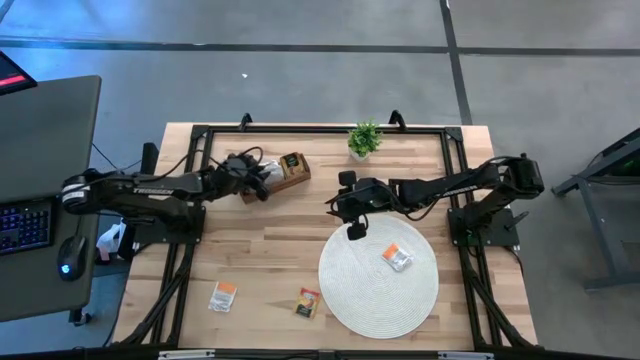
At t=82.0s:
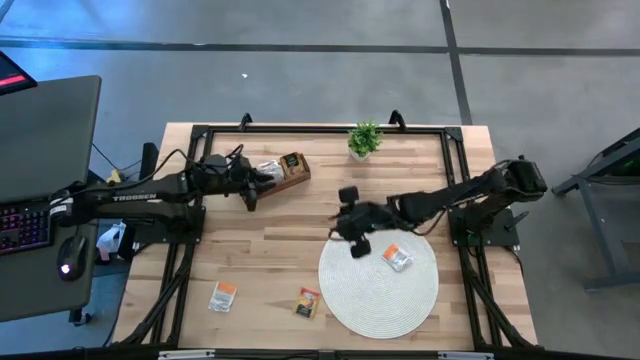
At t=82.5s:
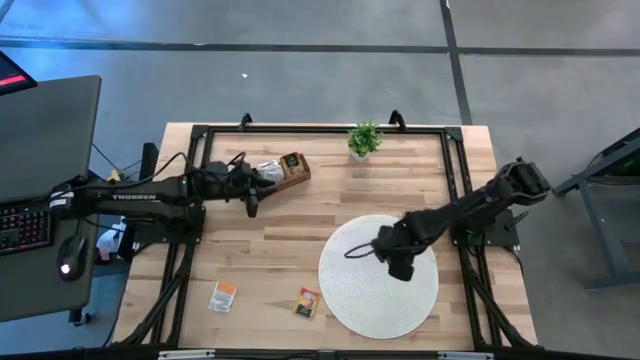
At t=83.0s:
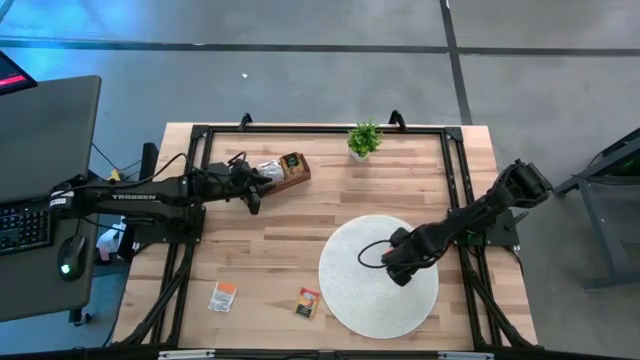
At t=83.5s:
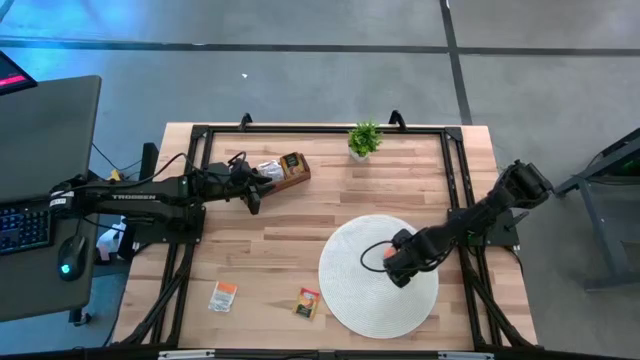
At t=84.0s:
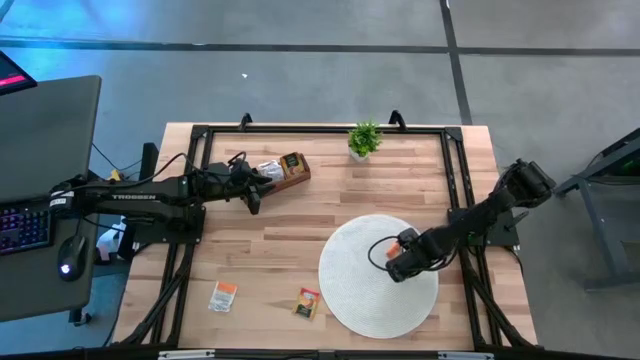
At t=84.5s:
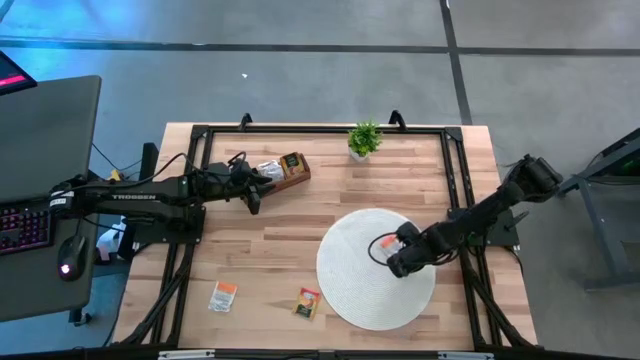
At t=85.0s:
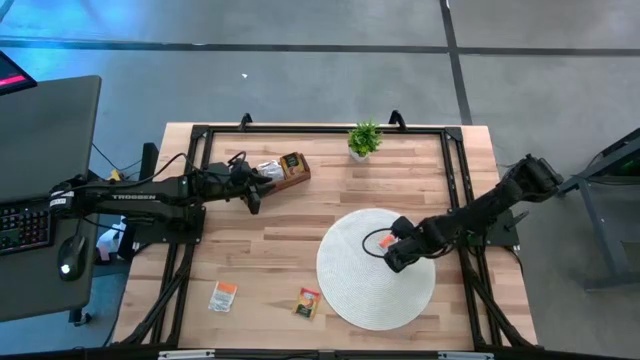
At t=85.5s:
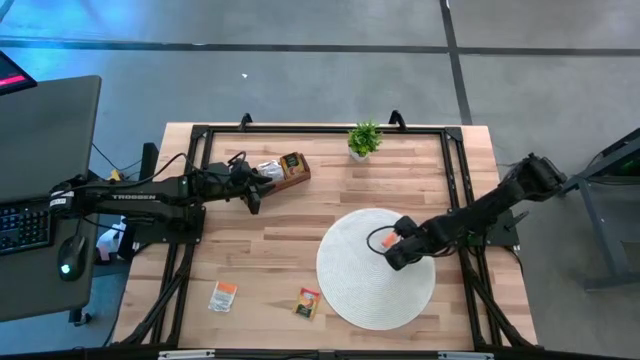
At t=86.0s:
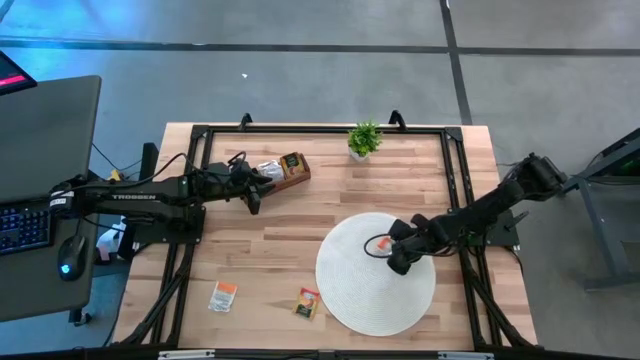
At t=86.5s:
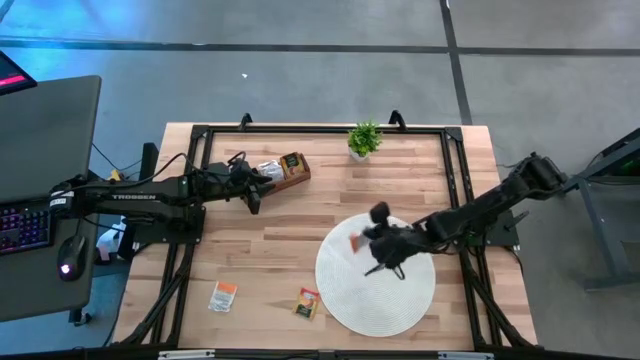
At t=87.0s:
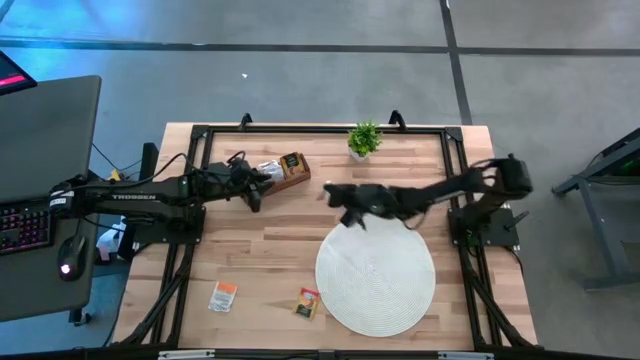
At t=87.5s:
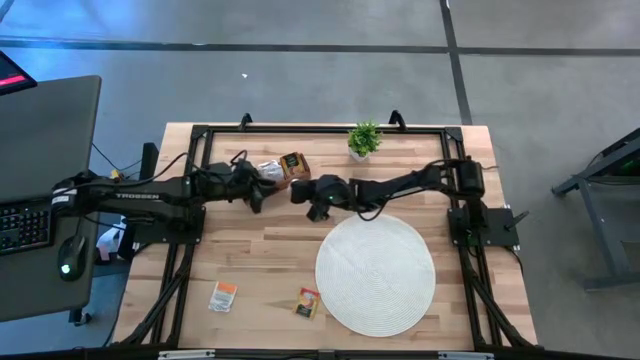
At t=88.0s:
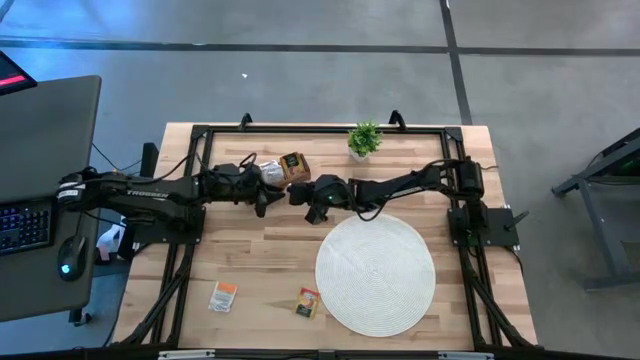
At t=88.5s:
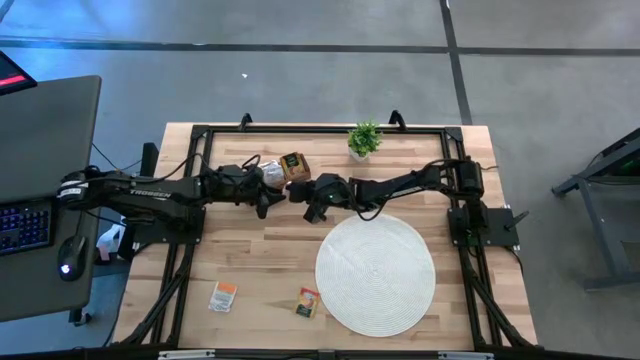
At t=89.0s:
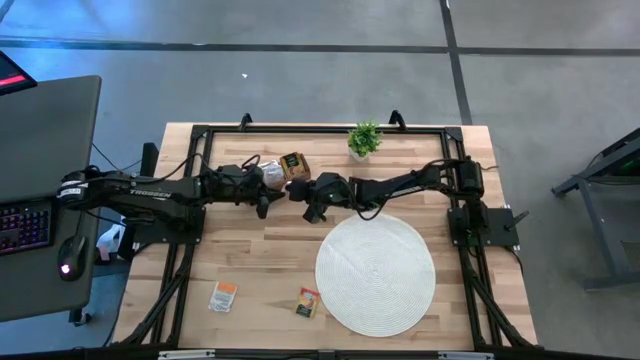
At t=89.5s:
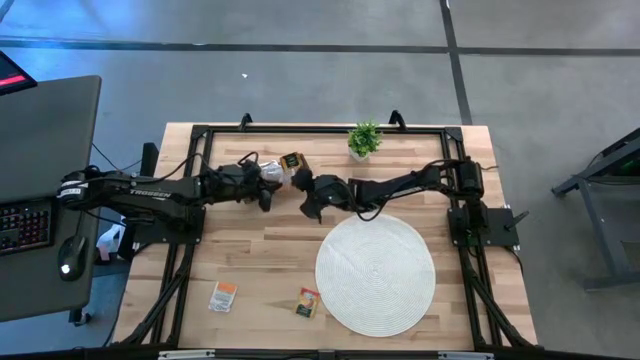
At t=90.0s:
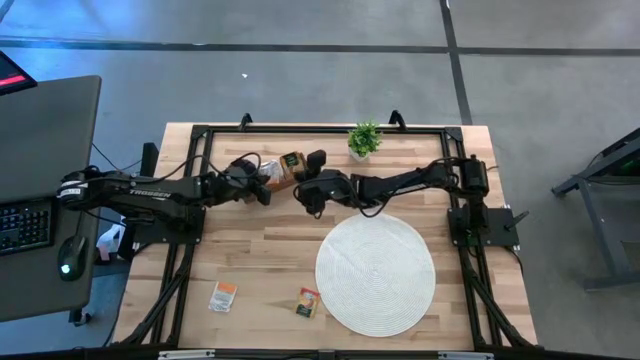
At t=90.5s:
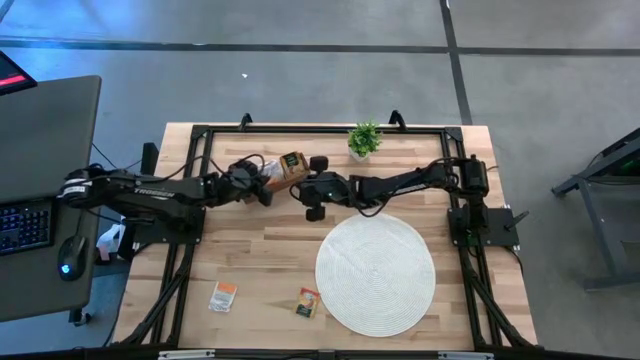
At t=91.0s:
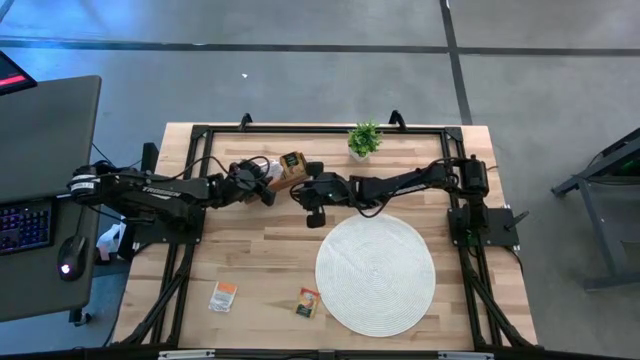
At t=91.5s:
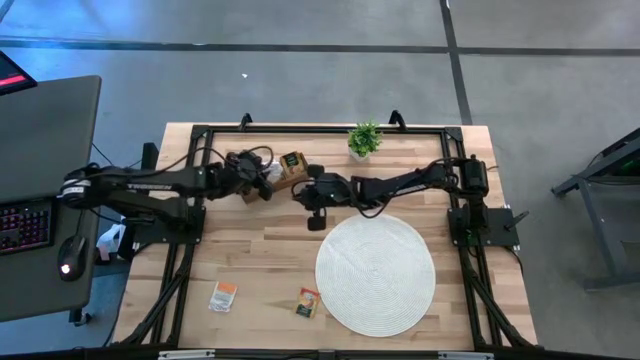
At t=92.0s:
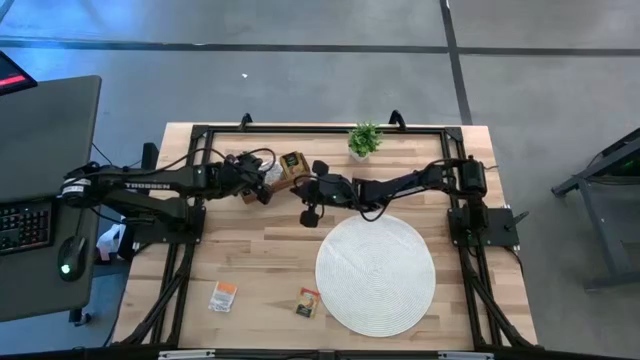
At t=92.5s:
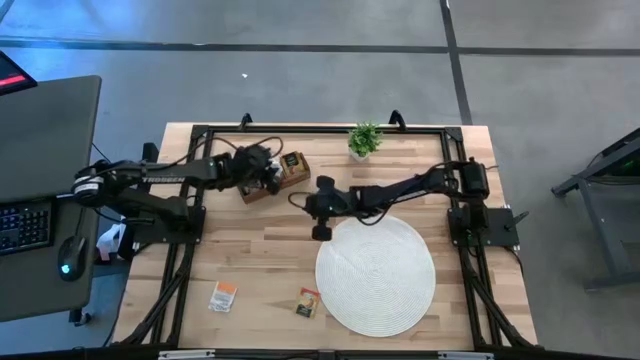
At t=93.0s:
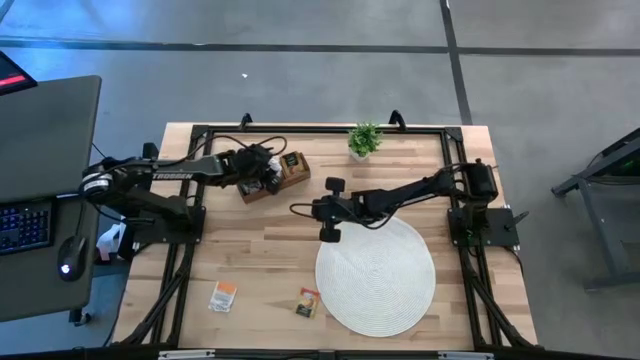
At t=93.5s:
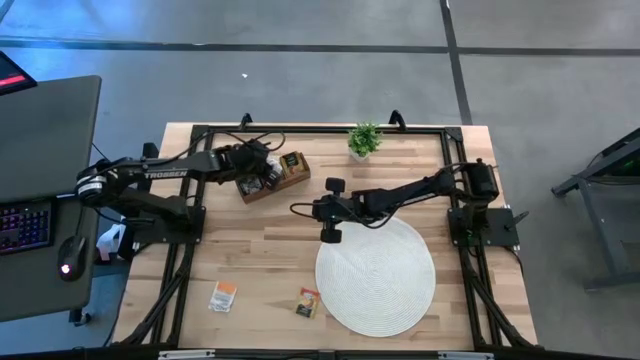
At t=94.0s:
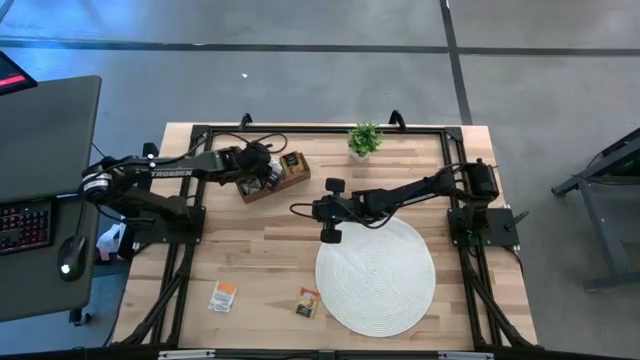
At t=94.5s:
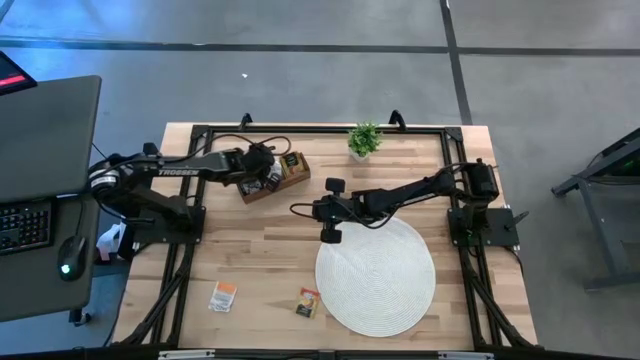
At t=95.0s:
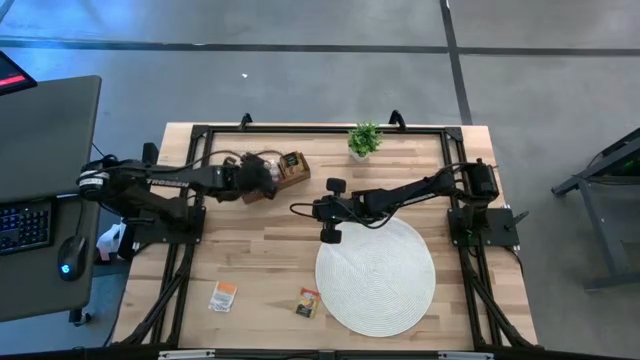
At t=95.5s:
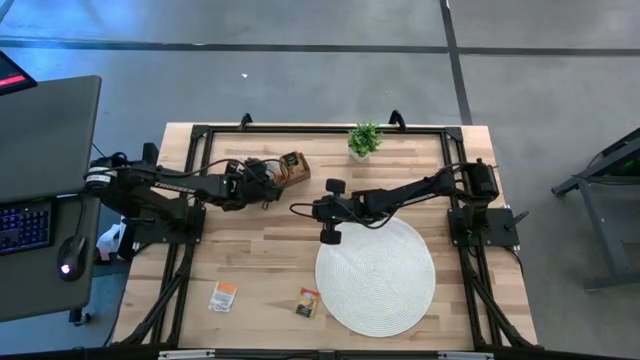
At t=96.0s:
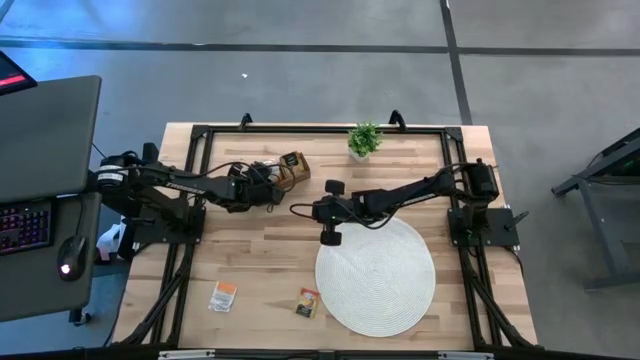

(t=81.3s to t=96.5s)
Task: Pick & Place Tea
Put the white tea bag into the middle section of the wooden organizer

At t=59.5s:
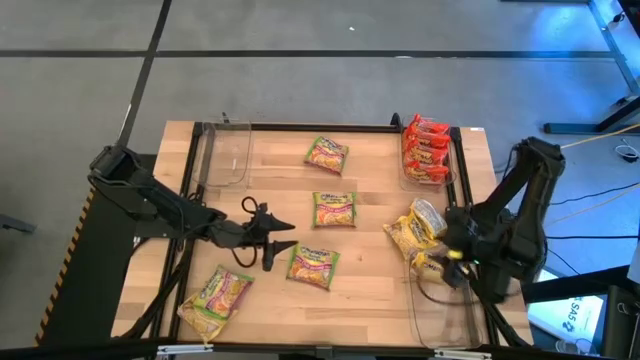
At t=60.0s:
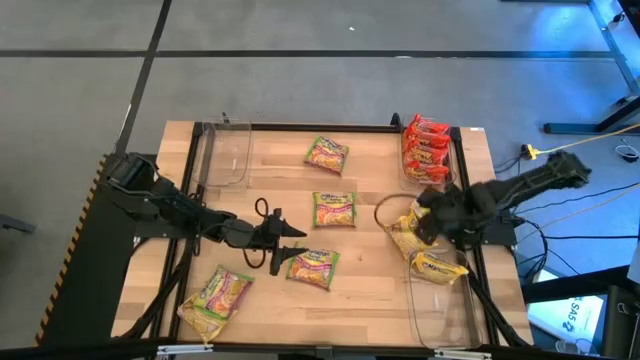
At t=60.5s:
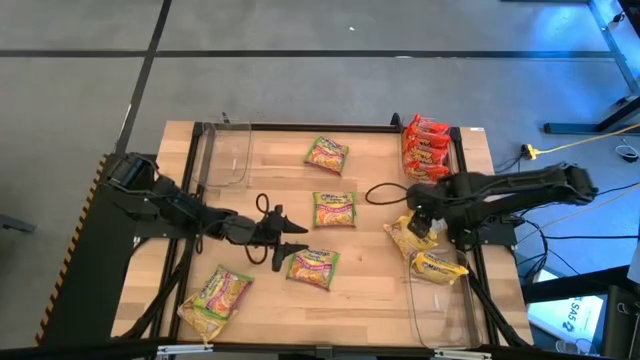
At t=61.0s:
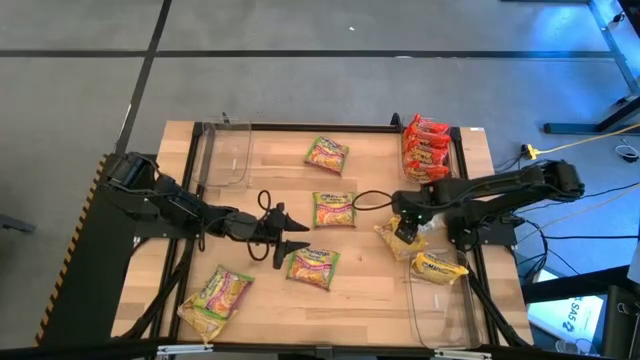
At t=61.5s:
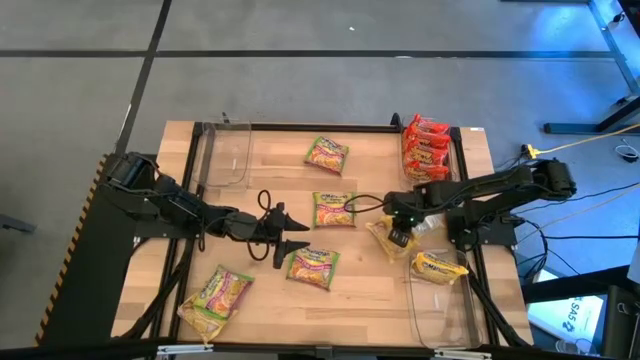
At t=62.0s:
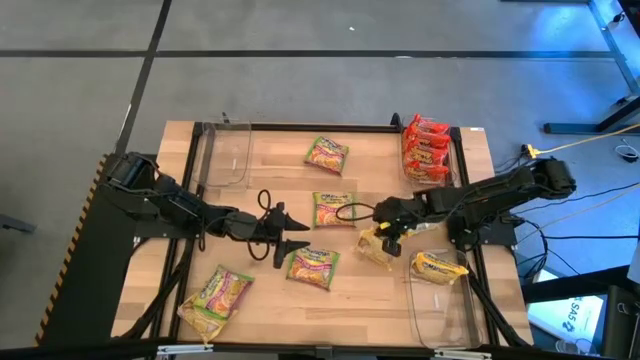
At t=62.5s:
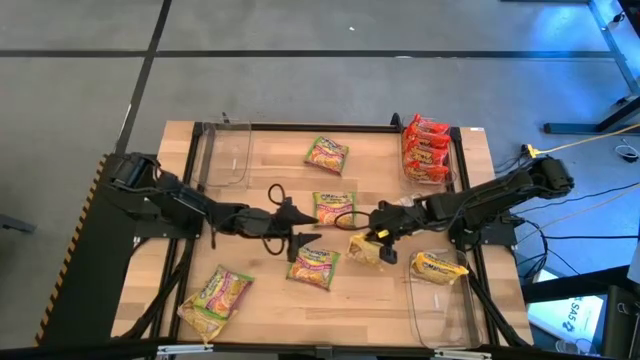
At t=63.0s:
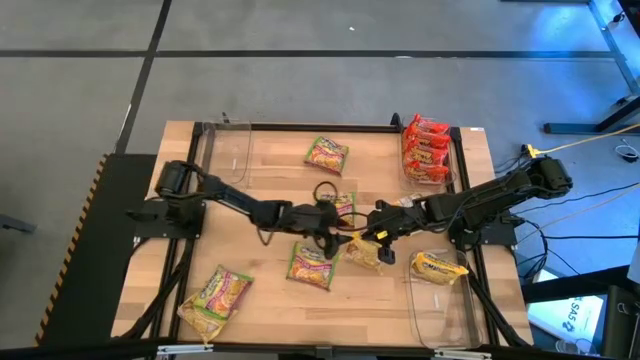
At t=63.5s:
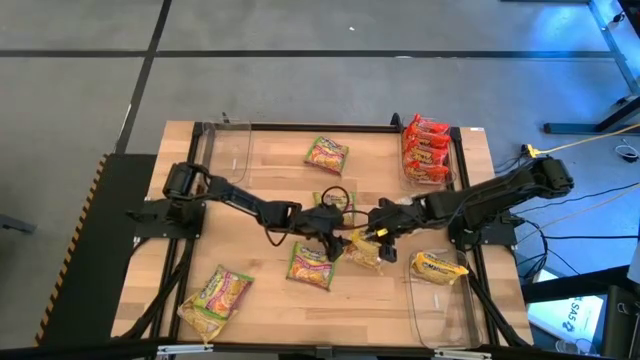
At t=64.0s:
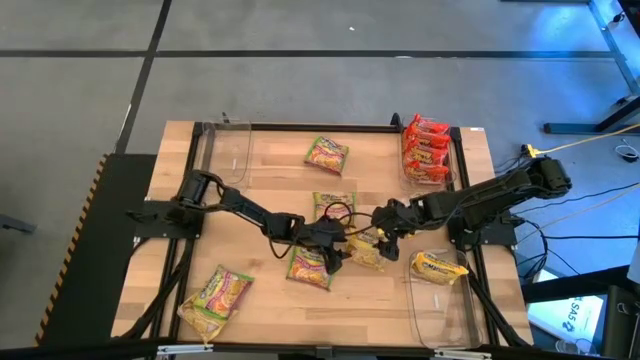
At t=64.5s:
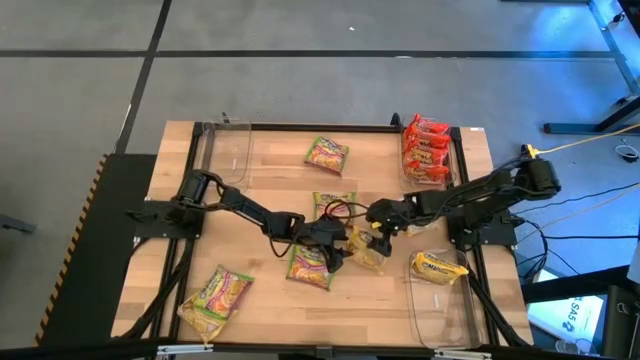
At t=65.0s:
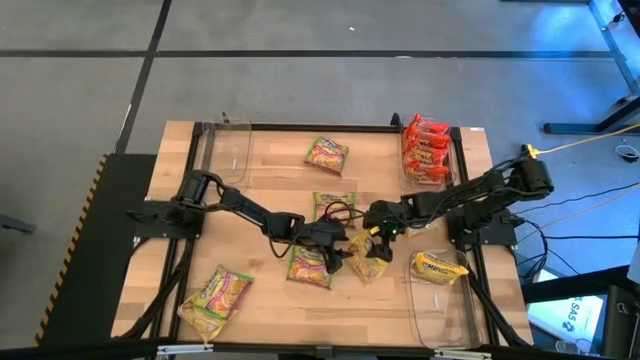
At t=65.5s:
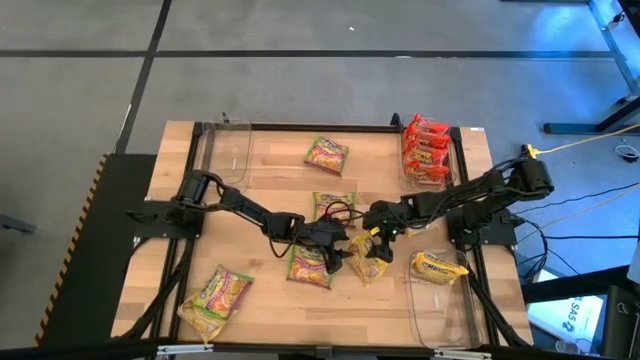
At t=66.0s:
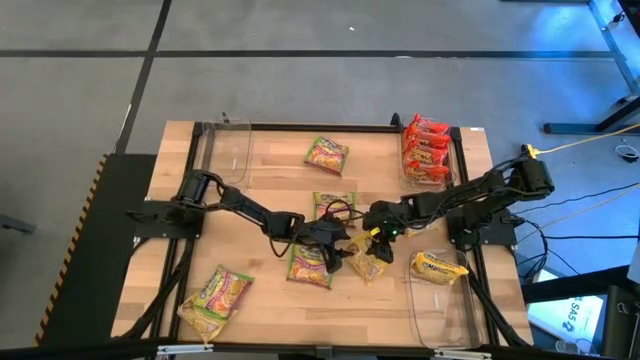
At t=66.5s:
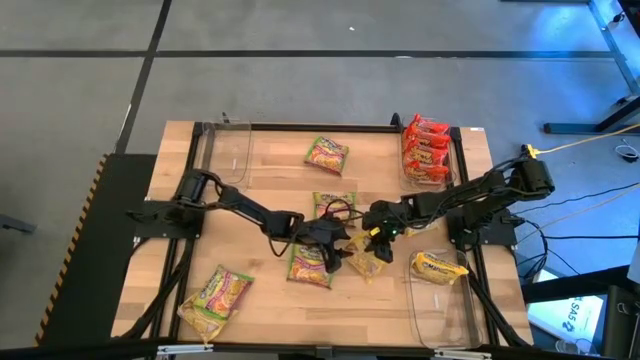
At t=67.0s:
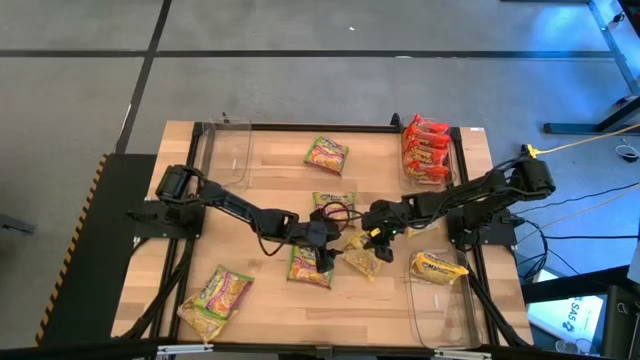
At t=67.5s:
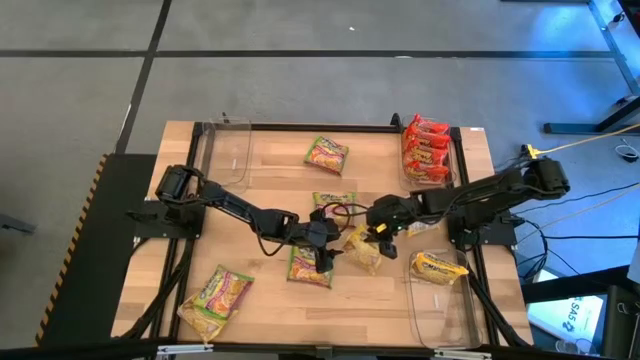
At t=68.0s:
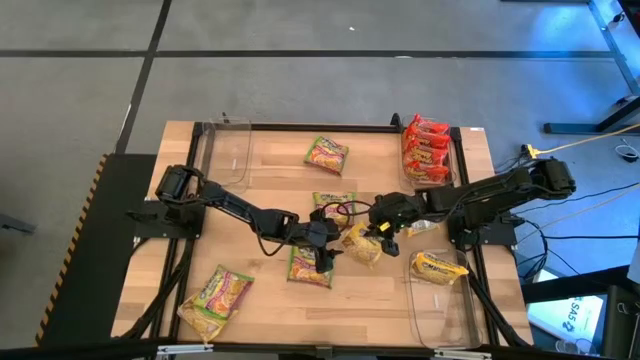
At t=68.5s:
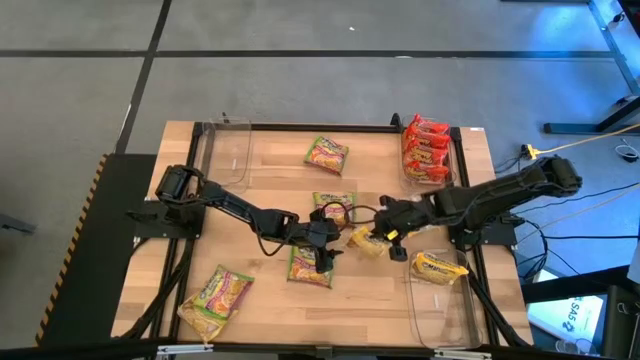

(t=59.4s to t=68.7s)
Task: Sort Maruchan noodles
Put the yellow noodle pack into the bottom transparent bin
